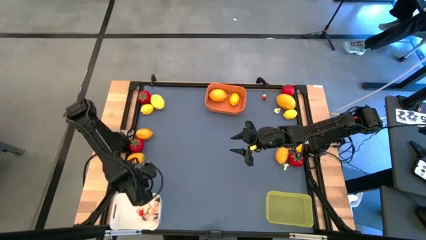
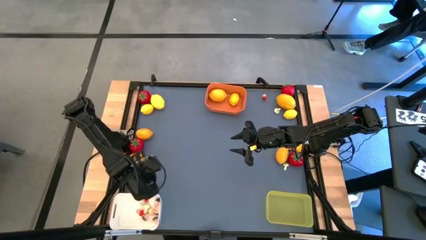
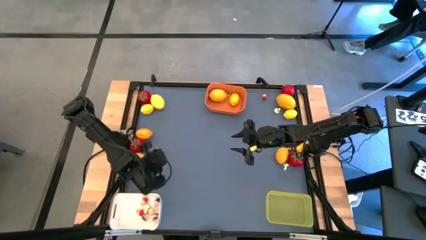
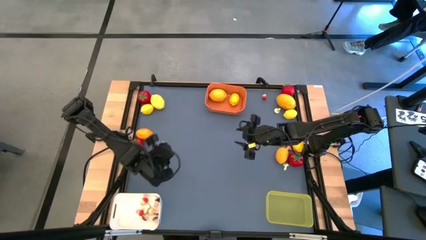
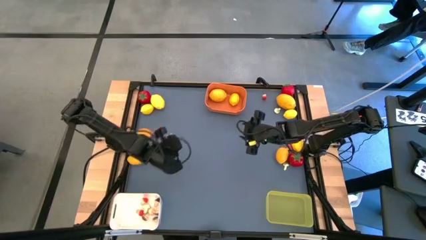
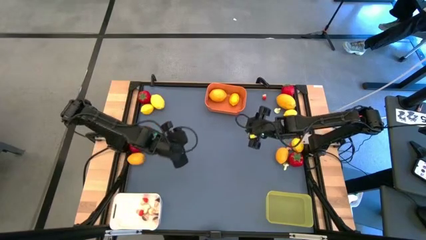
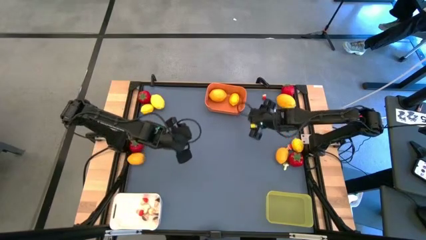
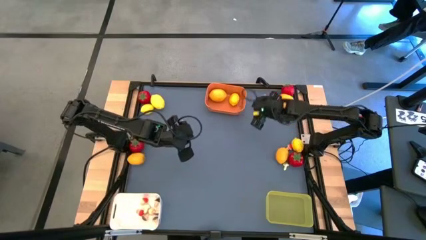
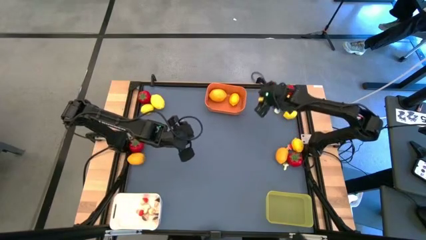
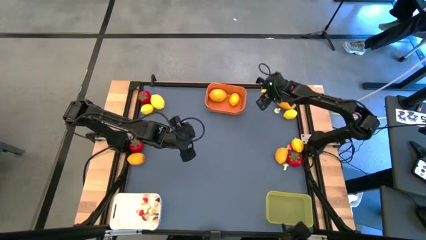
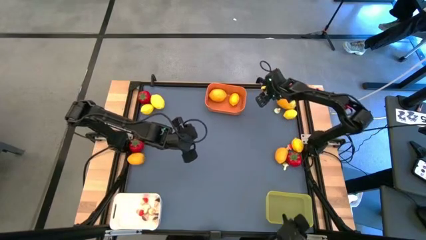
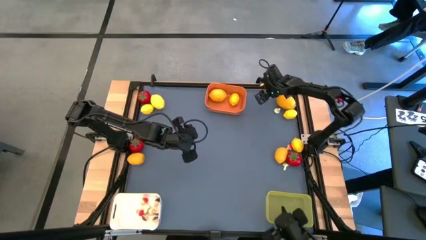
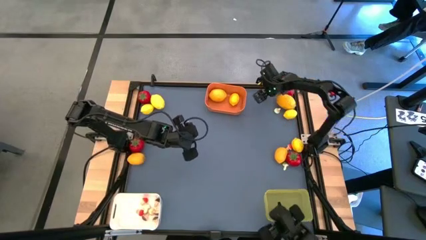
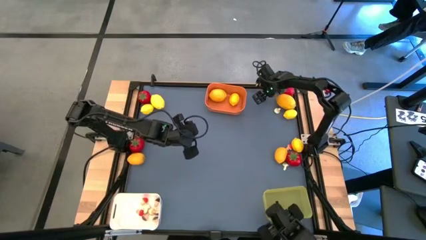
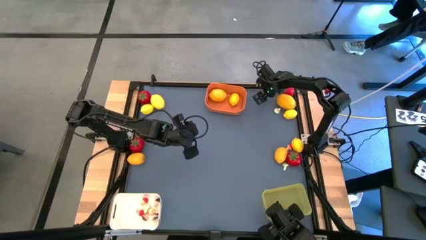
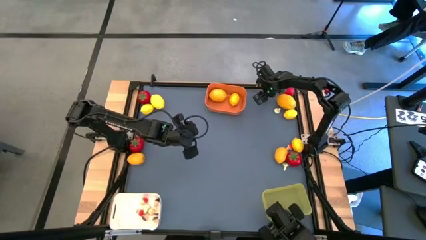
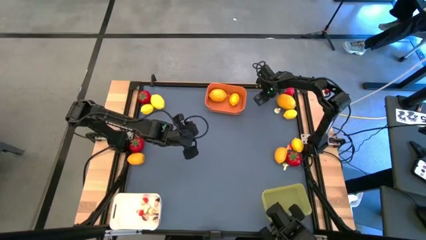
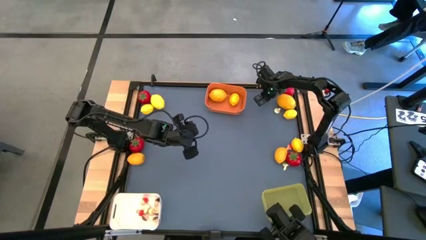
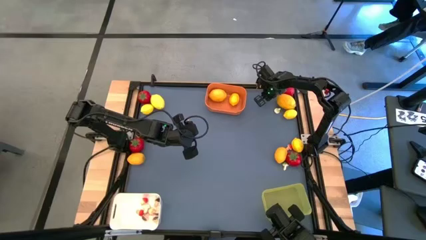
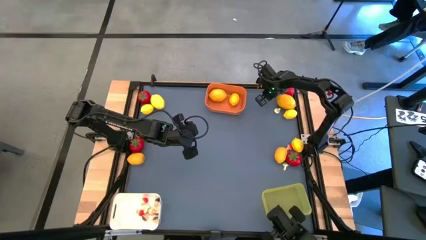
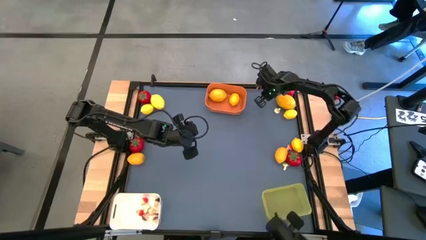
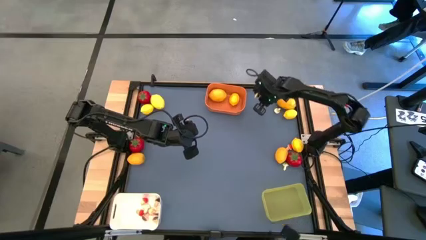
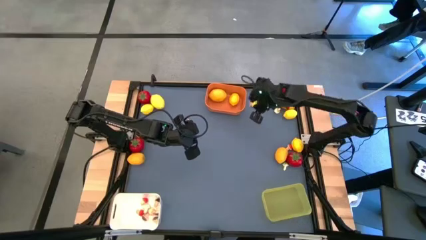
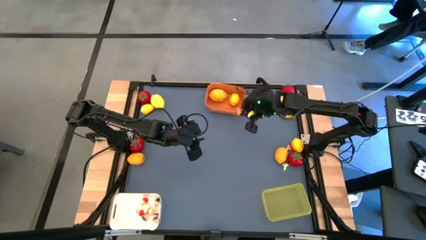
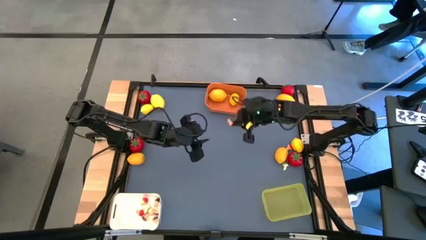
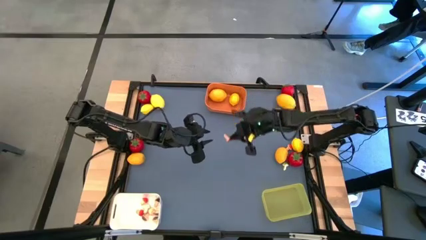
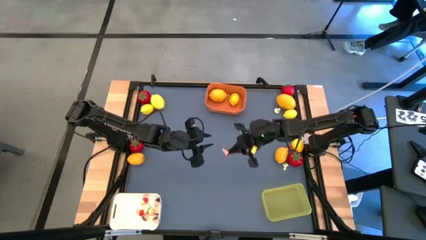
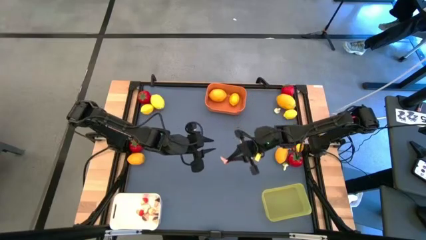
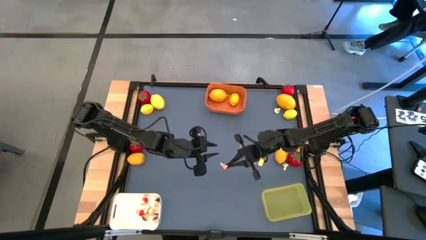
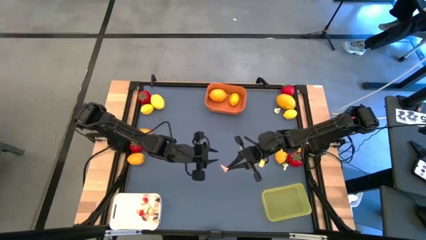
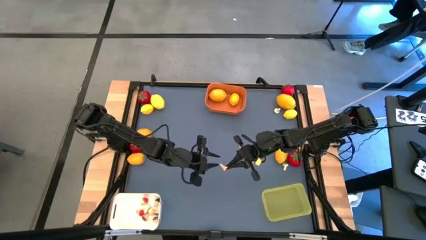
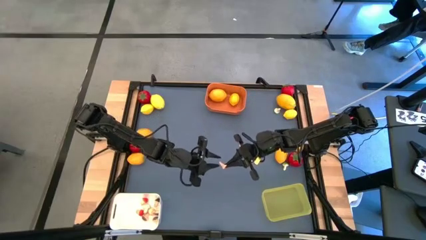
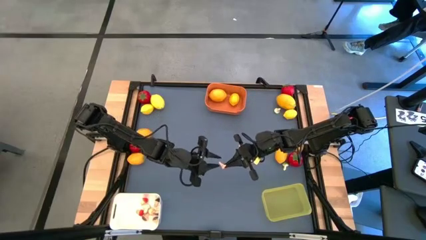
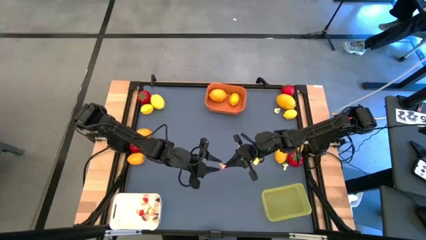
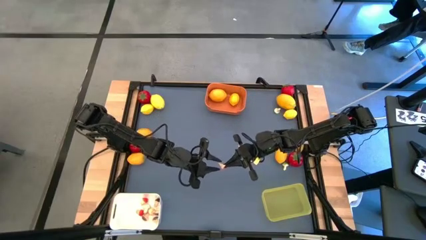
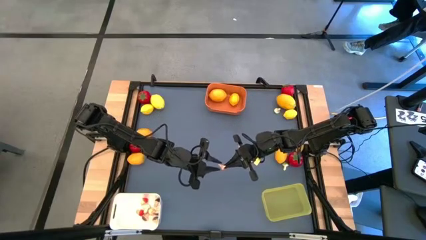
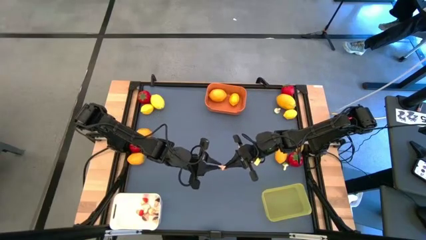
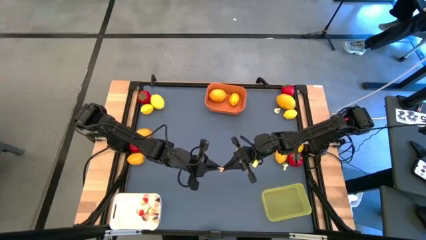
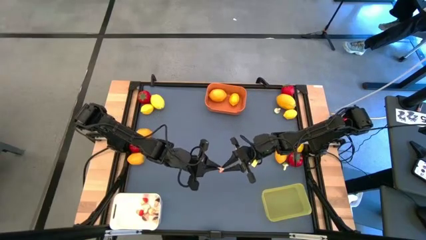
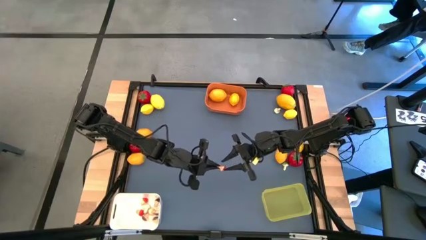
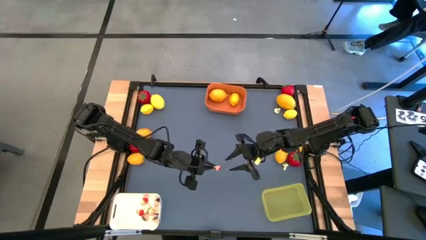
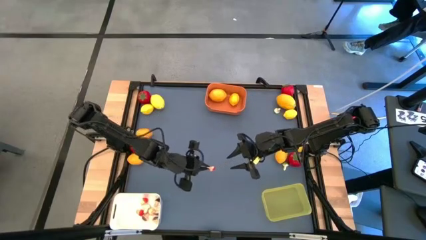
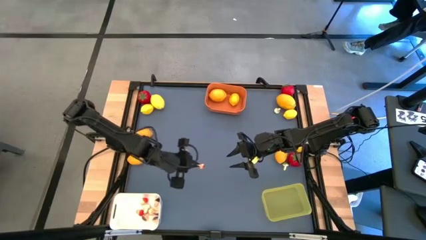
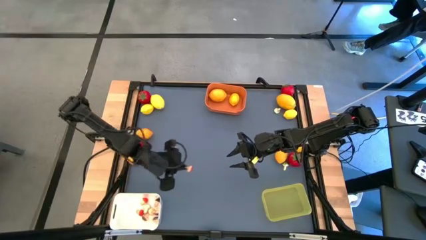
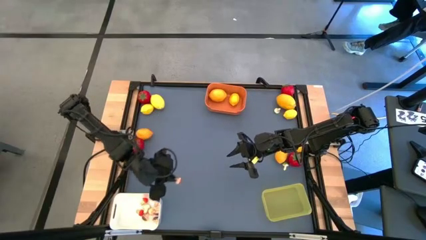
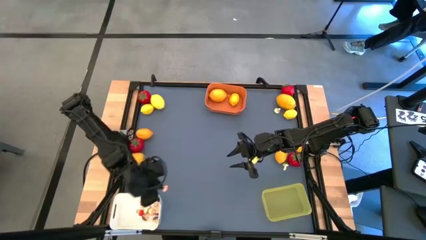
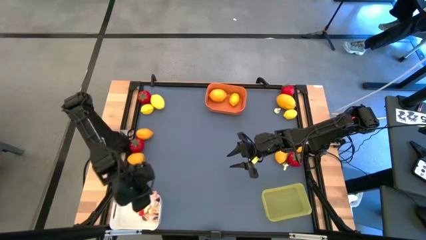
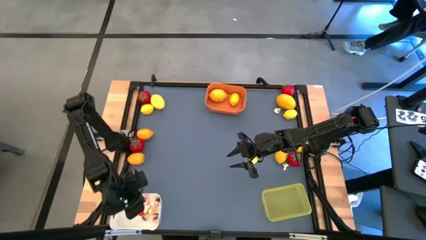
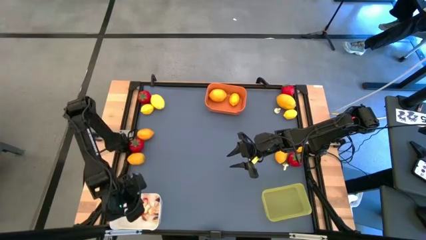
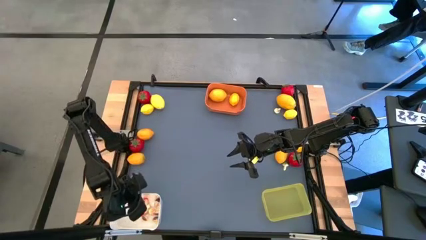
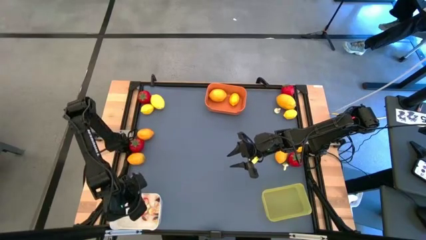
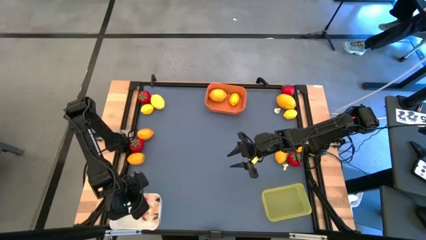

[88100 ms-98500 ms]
Task: Sort produce into baskets
Put the red mushroom into the white bin

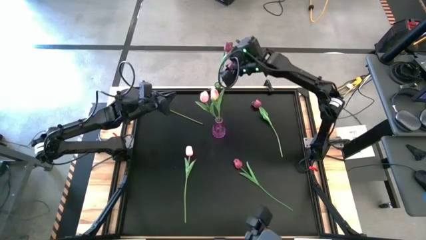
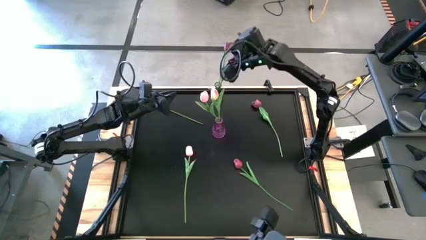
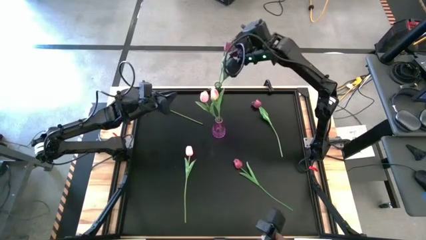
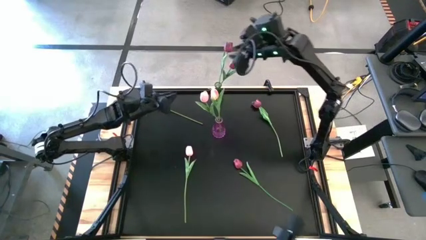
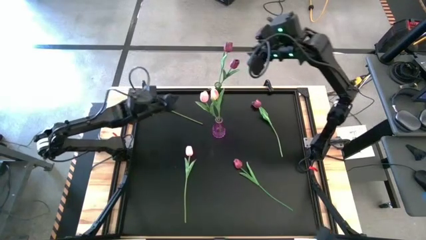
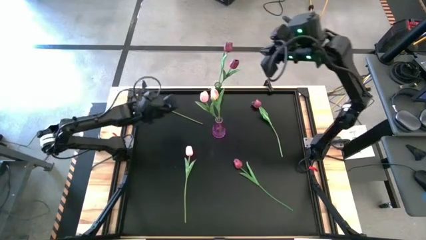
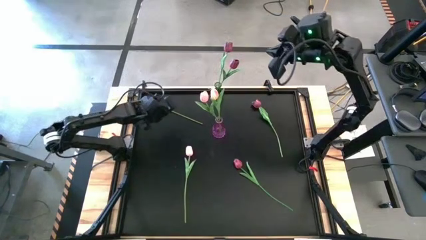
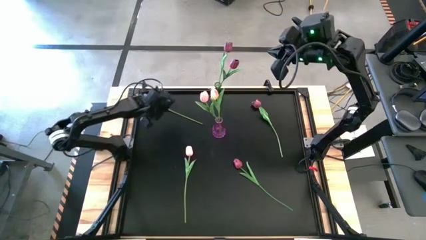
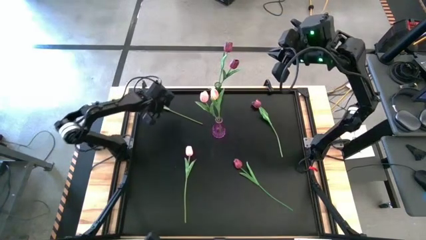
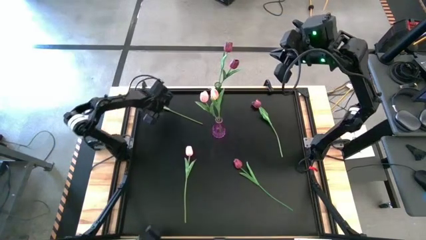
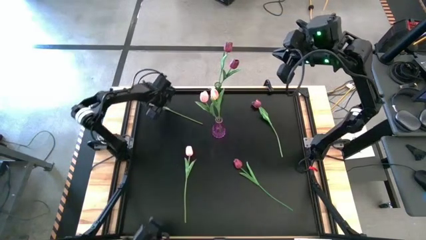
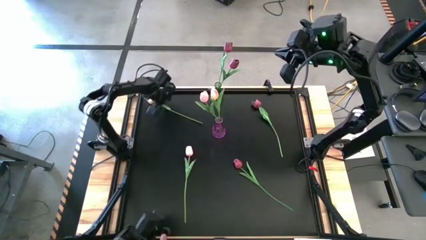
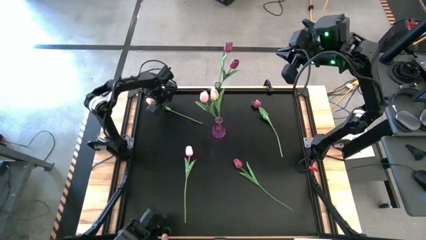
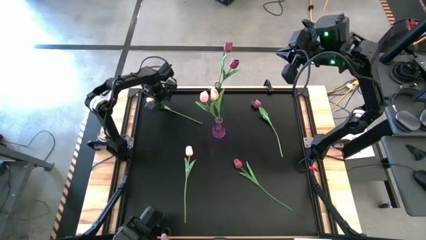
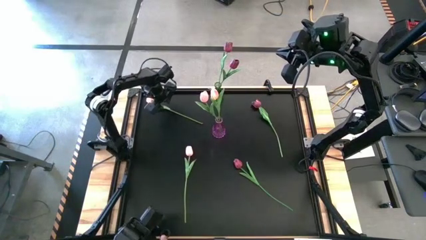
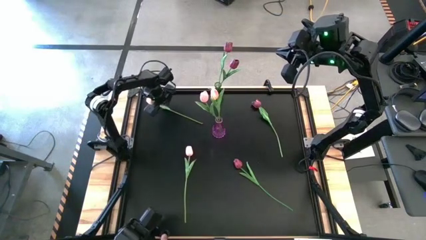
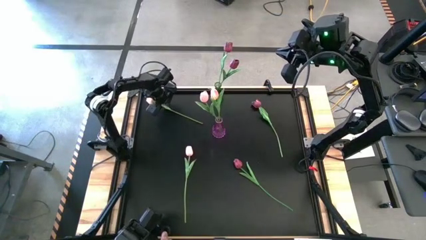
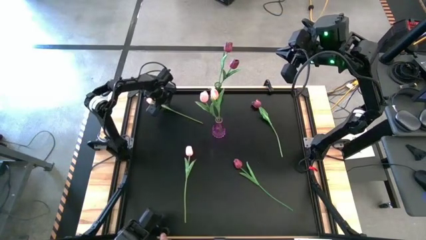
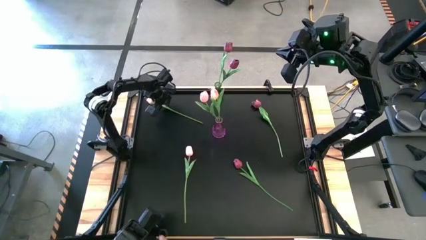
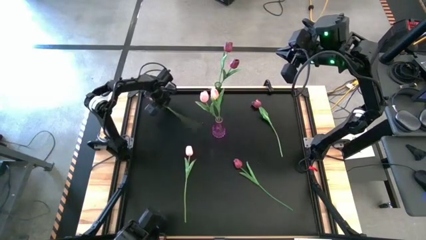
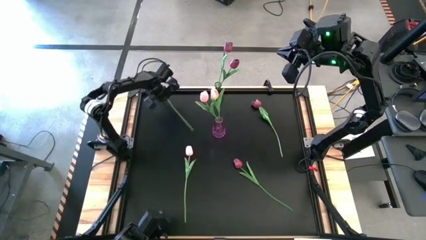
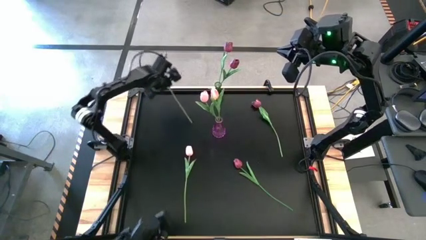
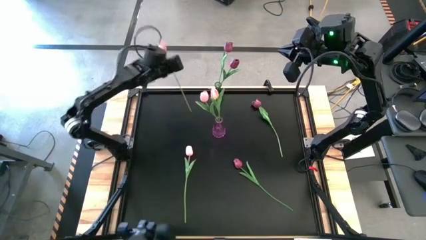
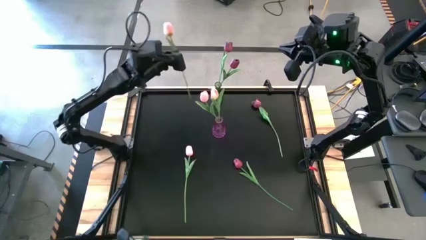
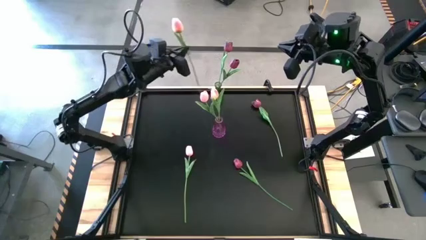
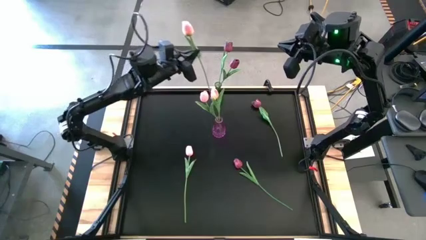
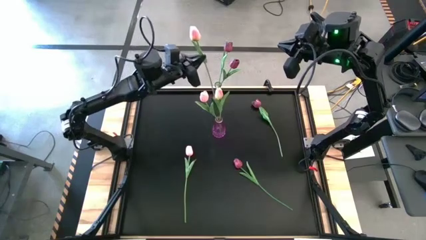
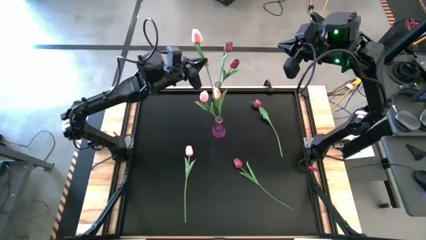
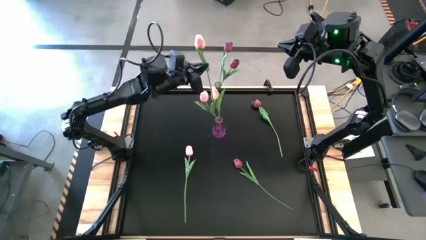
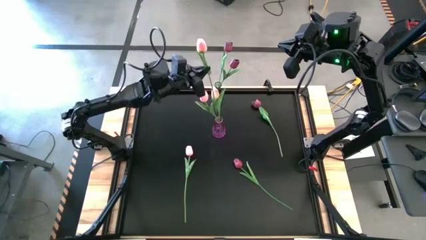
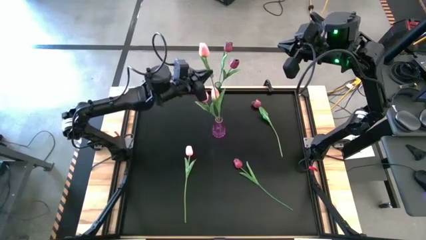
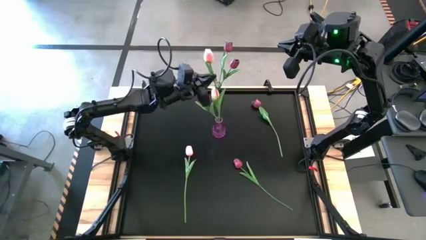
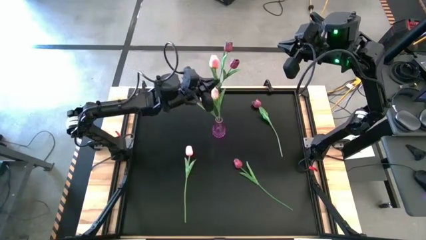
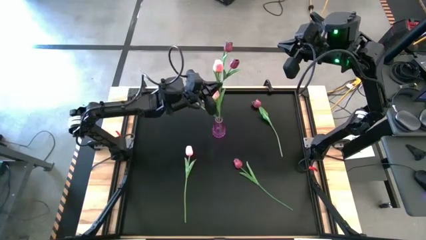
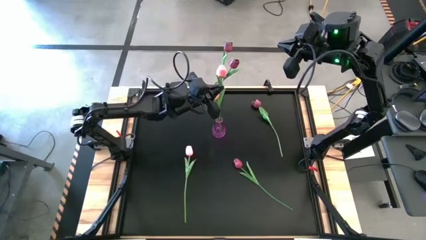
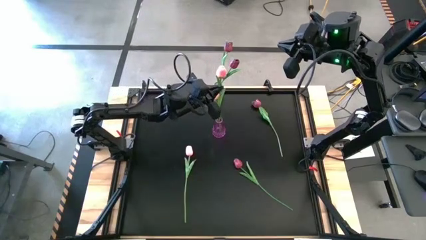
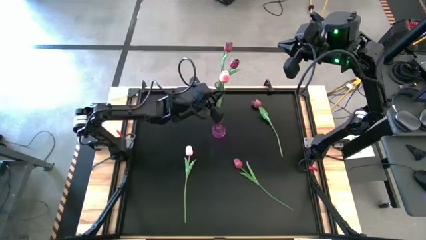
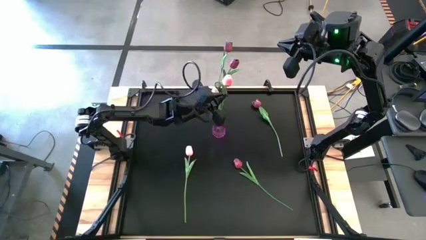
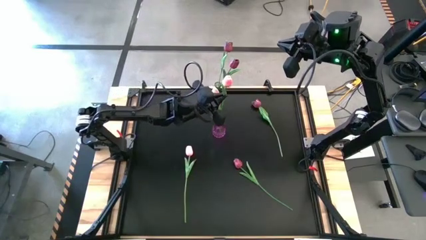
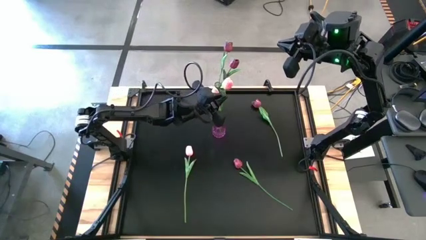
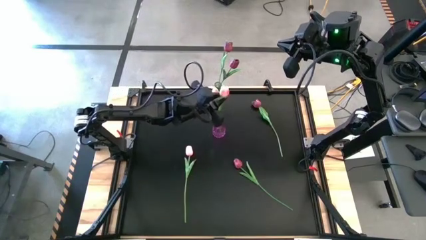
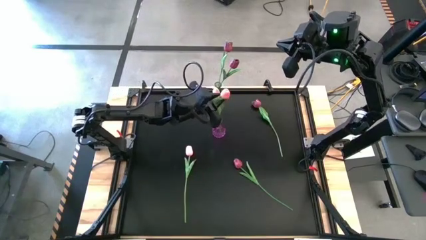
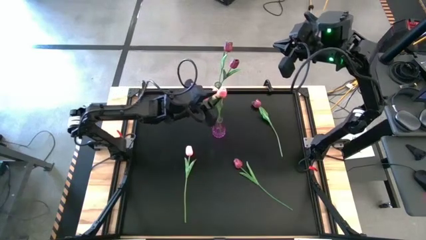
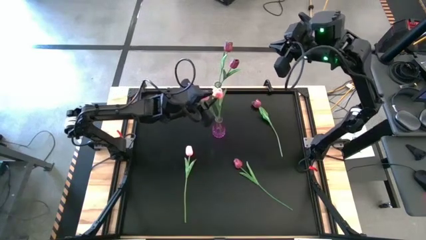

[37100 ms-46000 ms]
Task: Sort flowers into vase by color
Put the top pink tulip into the purple vase
